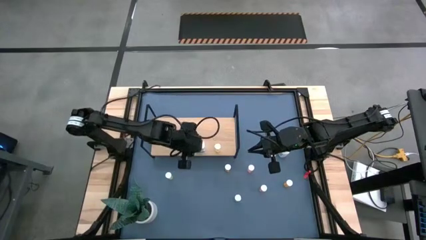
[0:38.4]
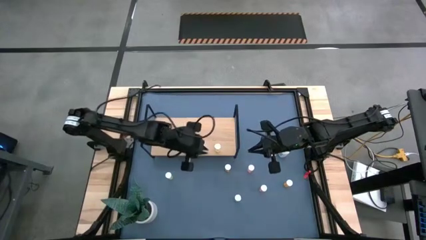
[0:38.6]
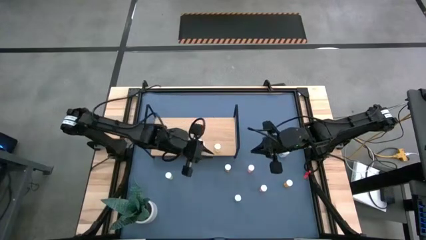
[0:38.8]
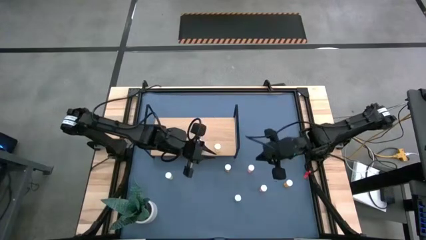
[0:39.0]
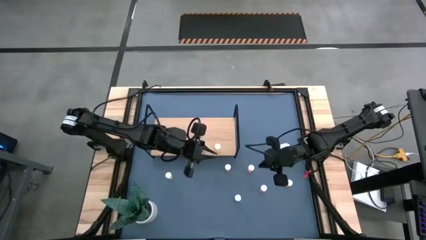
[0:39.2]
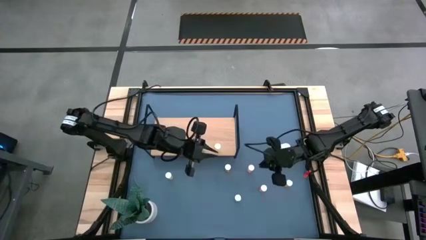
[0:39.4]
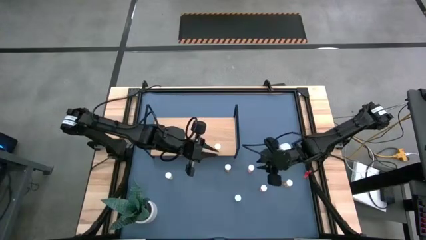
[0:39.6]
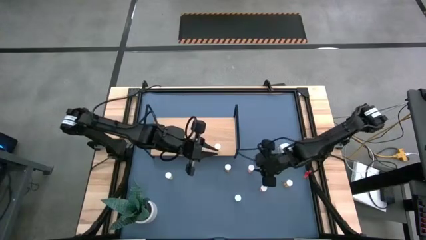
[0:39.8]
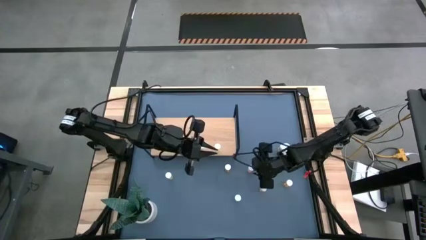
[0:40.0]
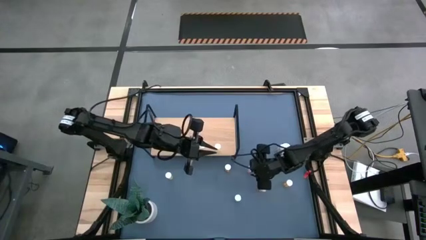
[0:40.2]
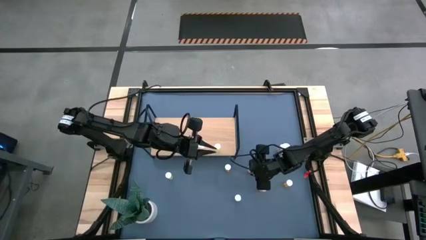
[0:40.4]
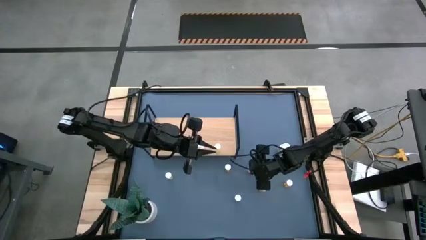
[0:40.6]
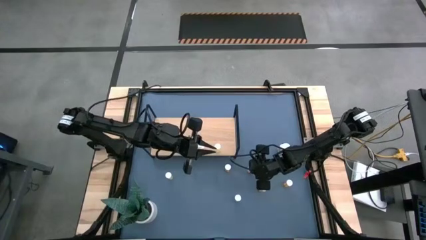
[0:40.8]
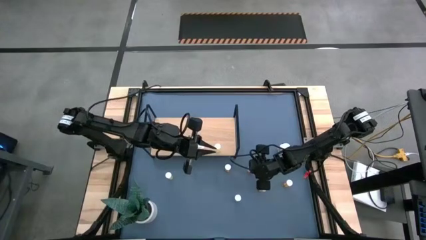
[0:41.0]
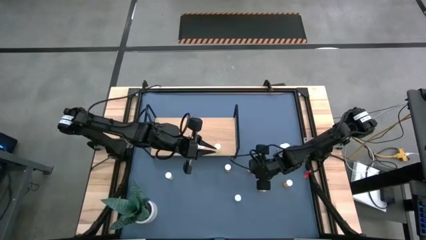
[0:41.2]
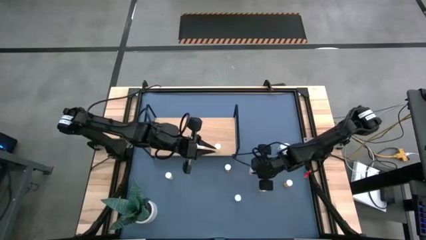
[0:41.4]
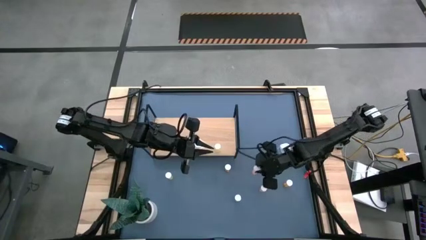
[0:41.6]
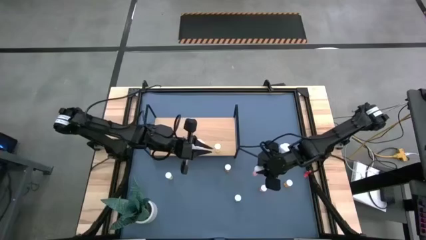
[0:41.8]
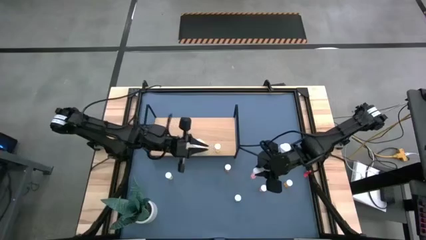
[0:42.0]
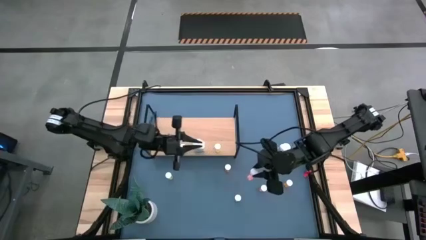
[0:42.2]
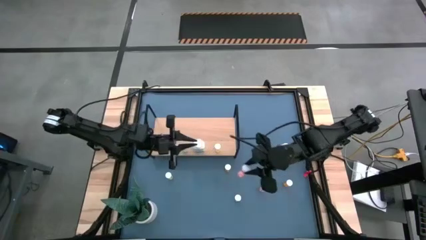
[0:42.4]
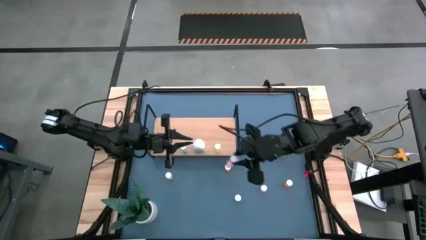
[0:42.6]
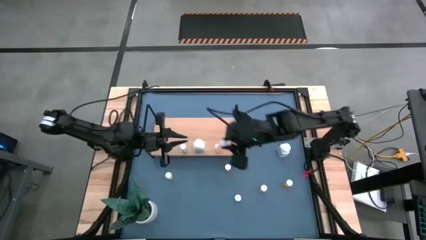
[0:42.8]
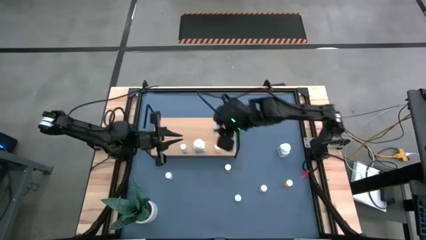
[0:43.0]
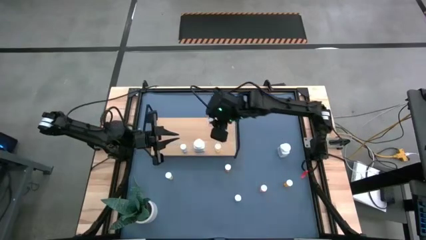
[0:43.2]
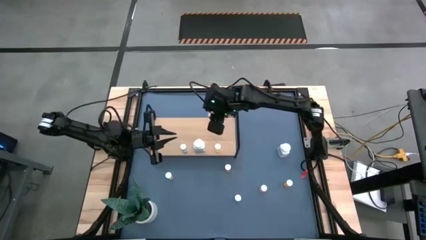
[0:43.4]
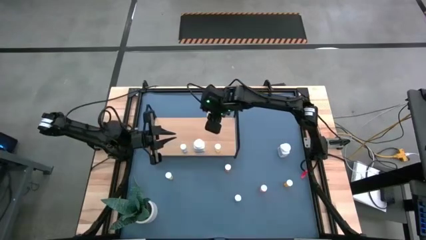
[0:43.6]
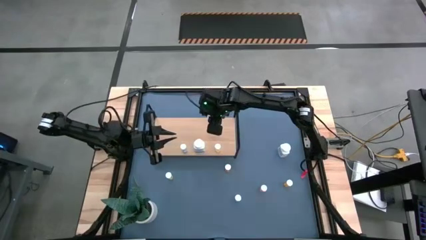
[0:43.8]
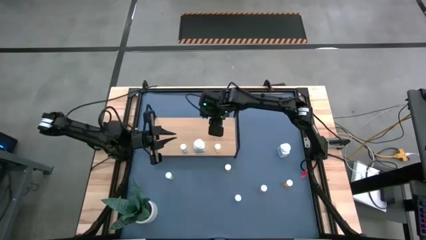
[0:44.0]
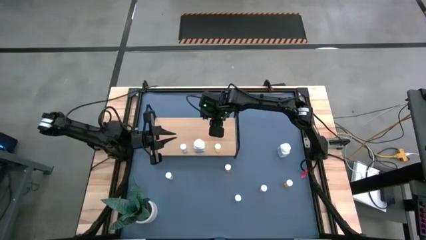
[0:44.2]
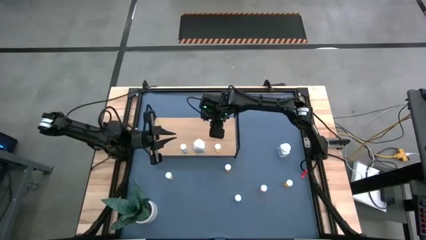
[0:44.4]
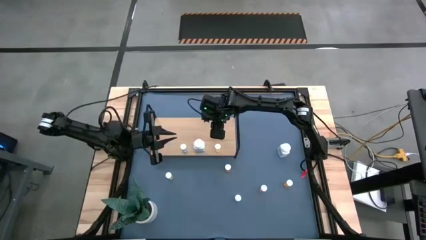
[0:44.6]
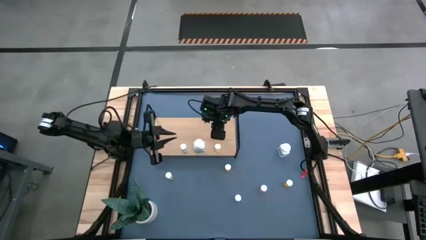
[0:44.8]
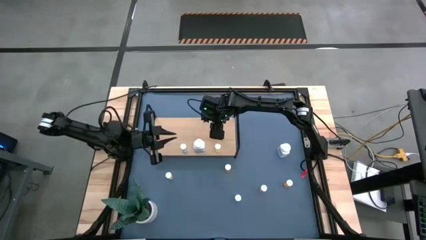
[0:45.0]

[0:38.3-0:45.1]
Task: Pick and place medicine bottles onto shelf by color
Put the top pink pill bottle on the shelf

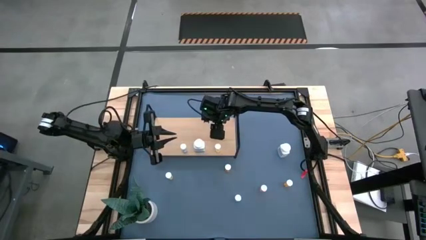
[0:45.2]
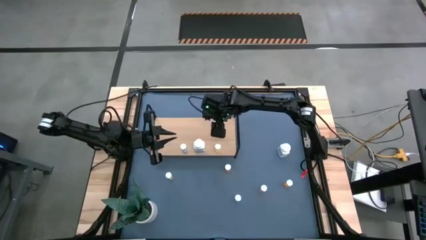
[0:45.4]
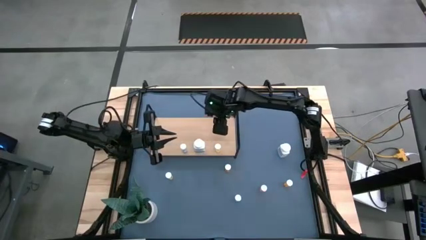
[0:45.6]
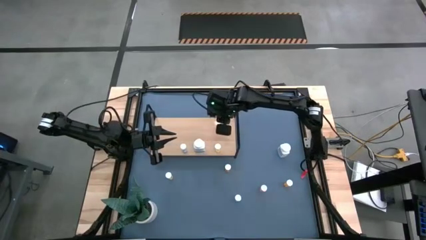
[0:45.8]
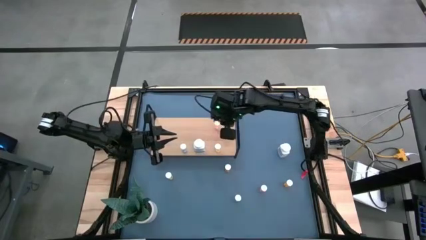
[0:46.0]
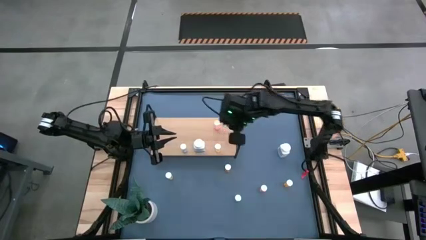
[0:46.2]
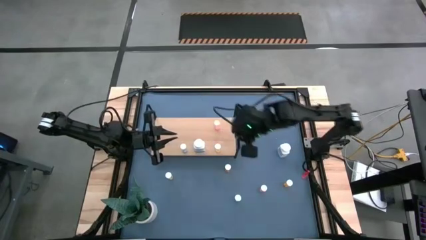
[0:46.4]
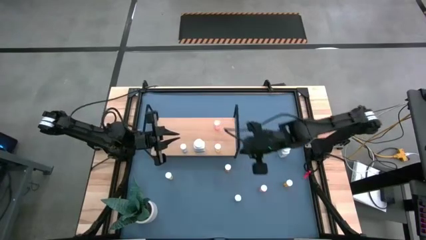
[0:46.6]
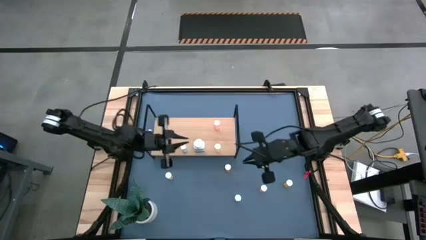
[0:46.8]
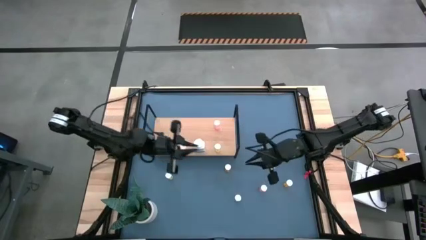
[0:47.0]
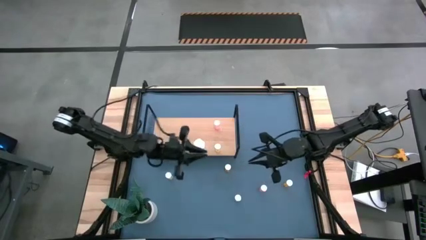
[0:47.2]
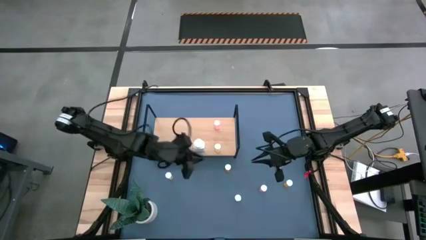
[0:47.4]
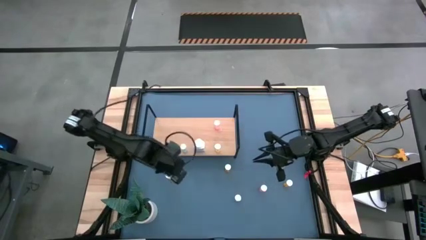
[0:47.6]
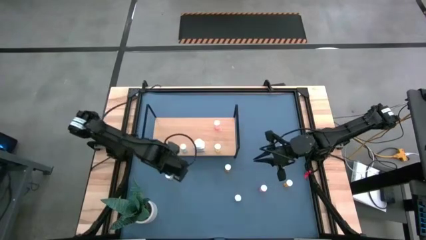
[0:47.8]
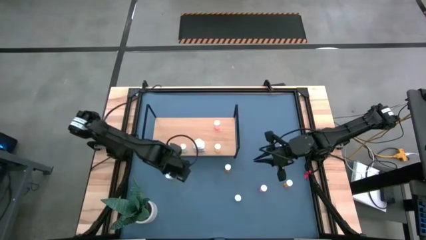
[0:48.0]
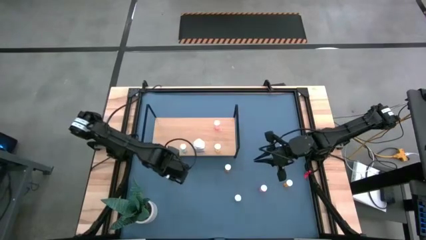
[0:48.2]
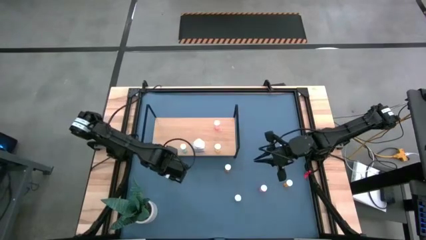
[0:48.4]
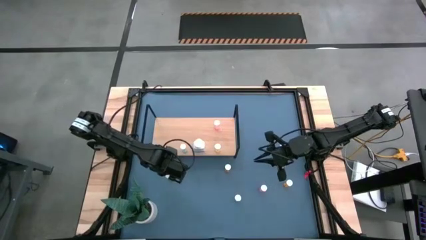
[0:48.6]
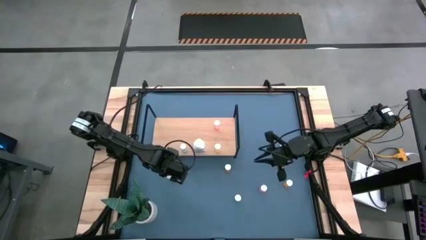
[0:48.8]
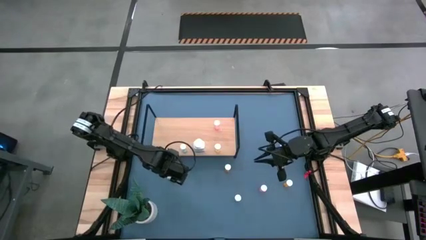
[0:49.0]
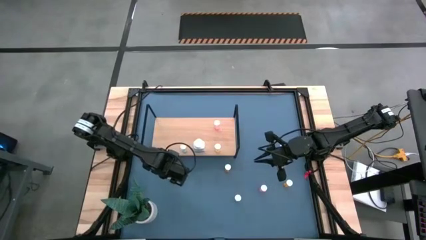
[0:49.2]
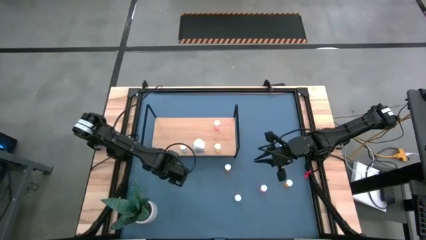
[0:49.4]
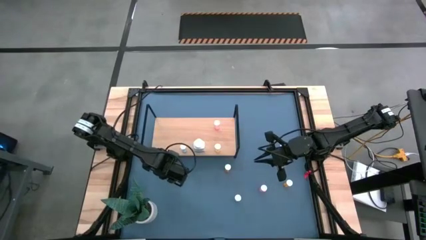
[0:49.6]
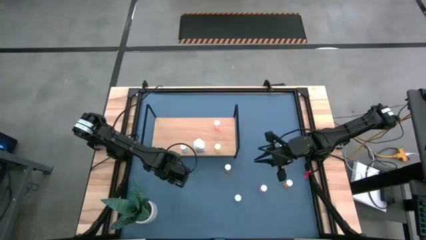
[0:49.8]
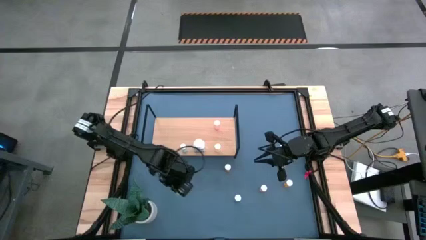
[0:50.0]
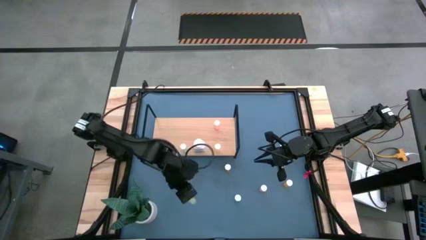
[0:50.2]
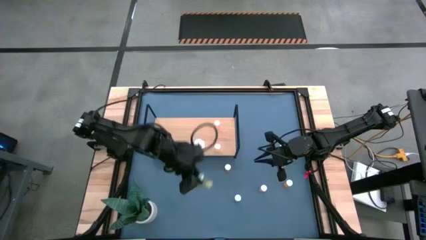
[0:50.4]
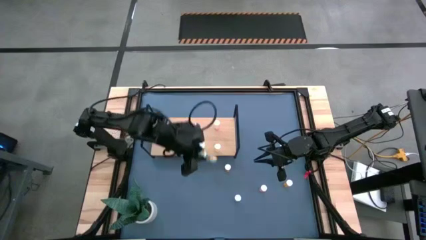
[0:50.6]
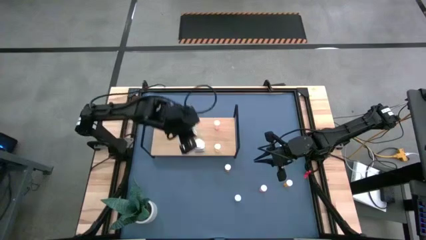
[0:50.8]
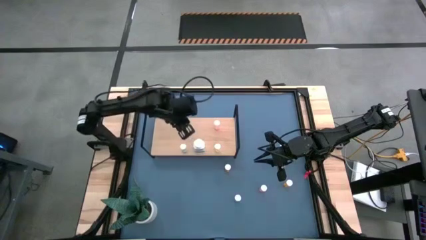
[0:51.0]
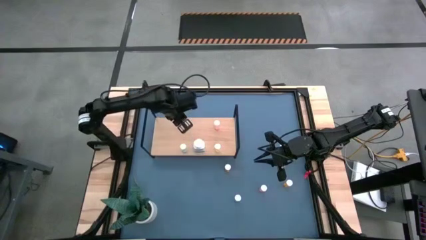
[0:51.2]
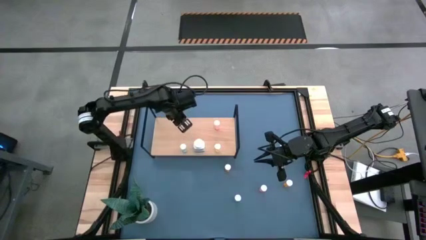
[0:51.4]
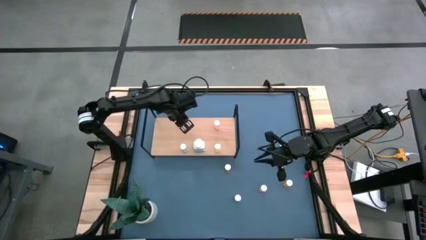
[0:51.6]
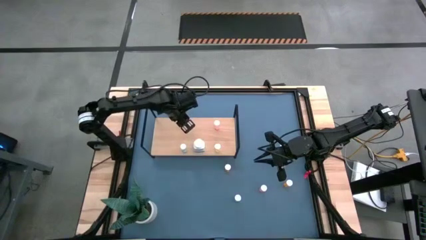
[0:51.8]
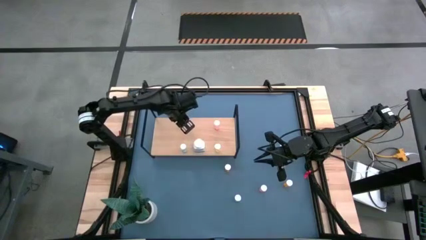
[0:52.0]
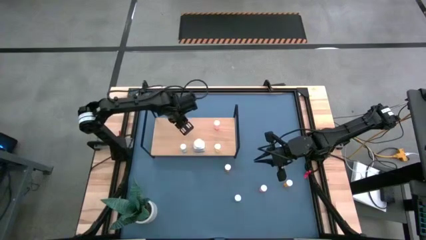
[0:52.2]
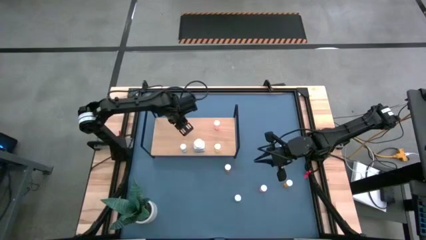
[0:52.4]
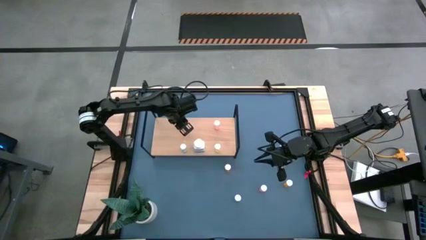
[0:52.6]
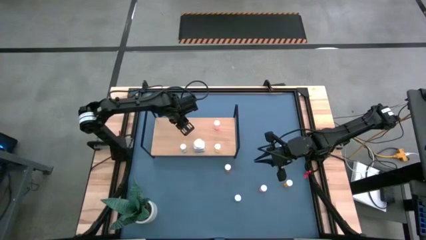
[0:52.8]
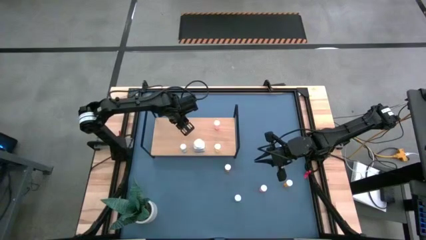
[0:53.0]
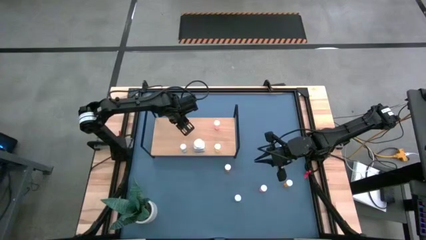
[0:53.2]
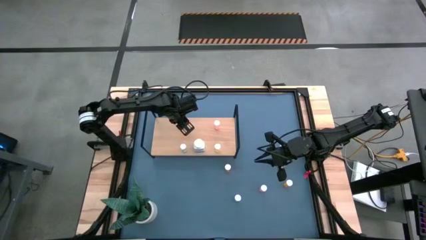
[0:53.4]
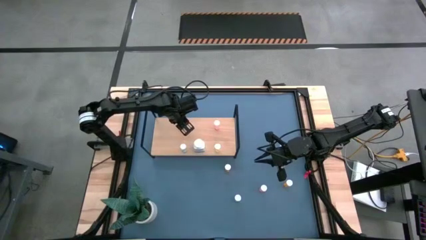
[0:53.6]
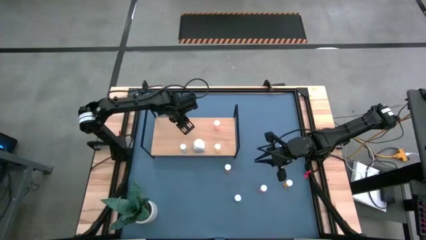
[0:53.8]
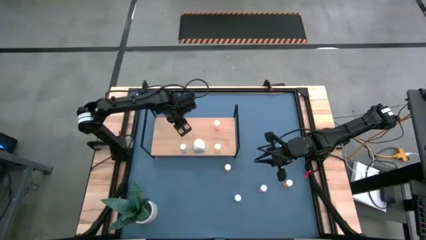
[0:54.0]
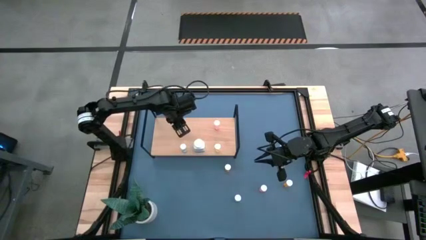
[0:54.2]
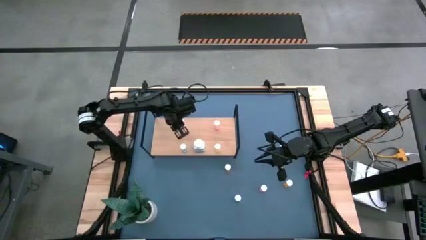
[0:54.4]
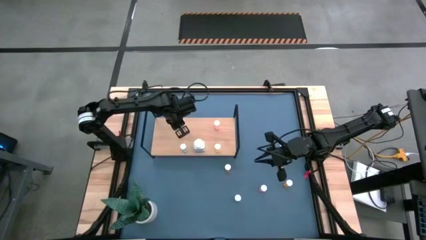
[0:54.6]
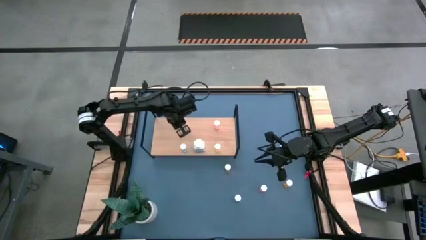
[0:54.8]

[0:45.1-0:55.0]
Put the yellow pill bottle on the shelf
